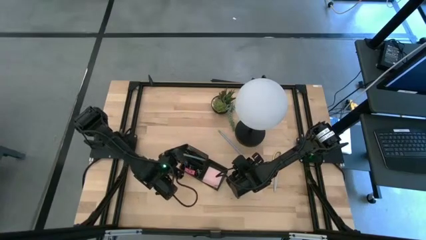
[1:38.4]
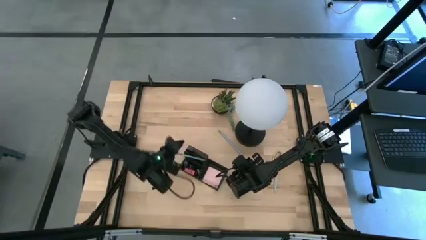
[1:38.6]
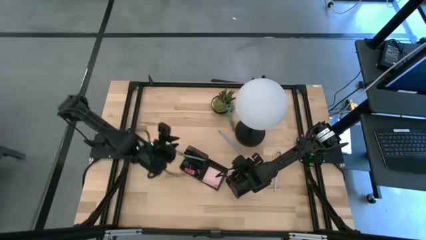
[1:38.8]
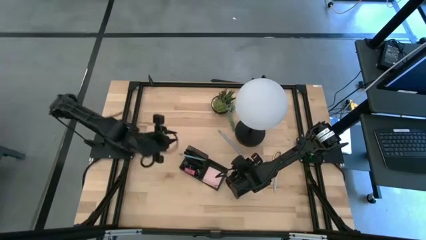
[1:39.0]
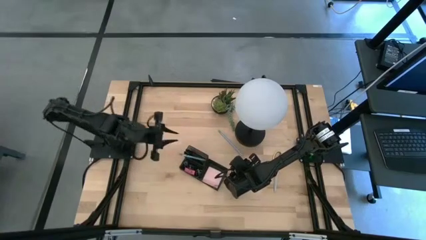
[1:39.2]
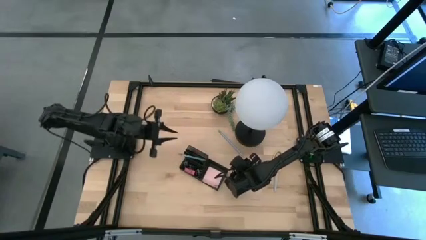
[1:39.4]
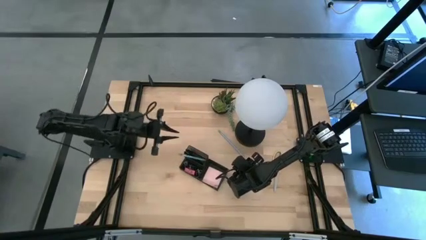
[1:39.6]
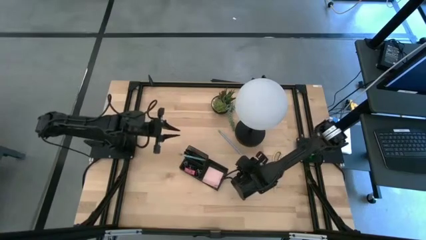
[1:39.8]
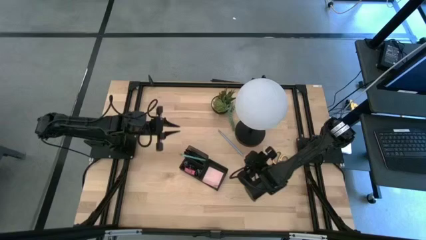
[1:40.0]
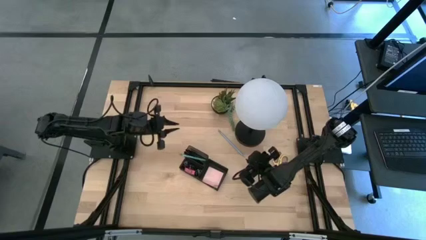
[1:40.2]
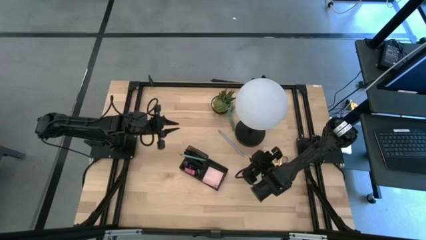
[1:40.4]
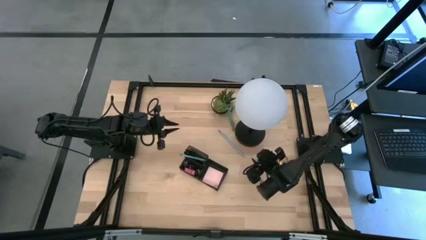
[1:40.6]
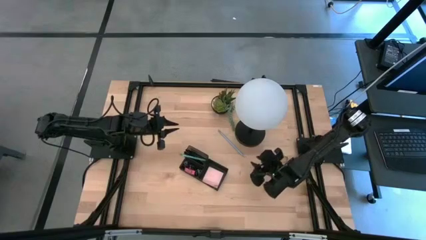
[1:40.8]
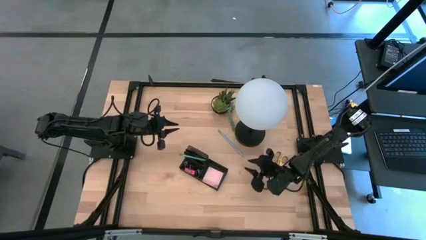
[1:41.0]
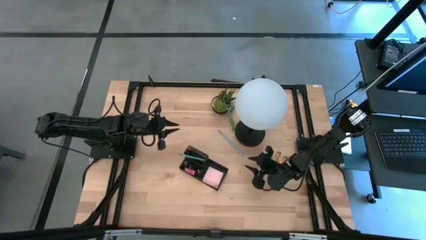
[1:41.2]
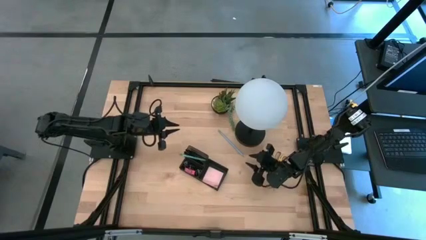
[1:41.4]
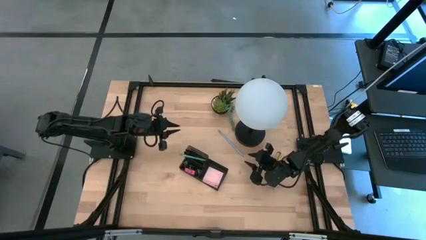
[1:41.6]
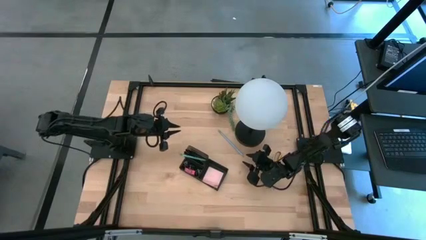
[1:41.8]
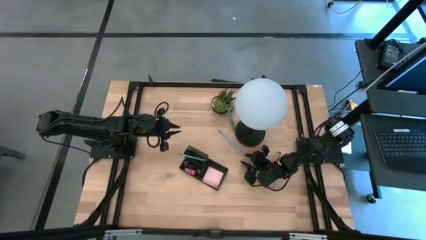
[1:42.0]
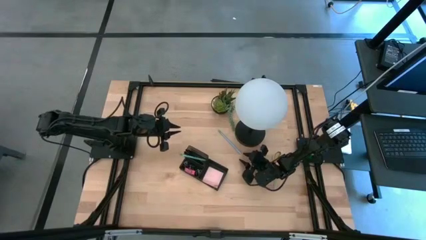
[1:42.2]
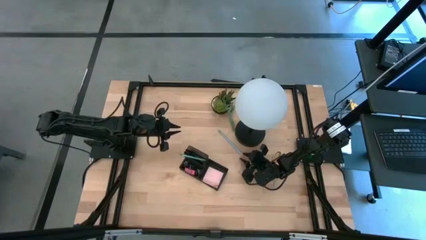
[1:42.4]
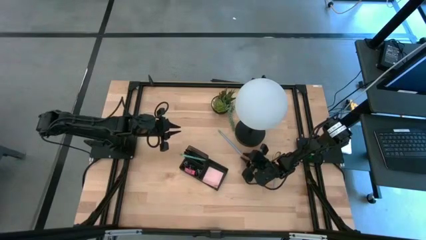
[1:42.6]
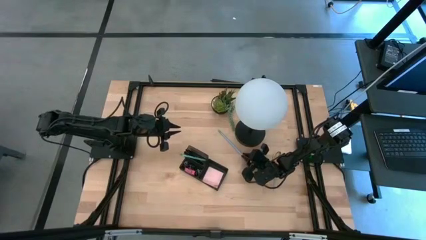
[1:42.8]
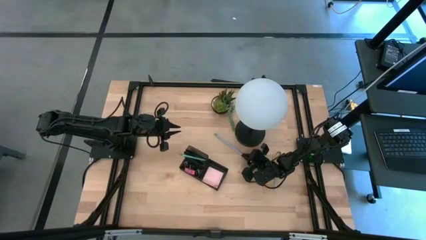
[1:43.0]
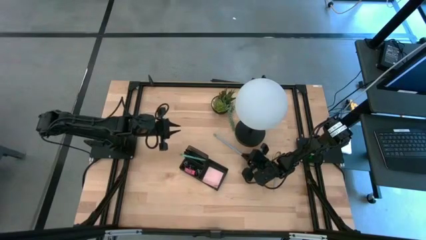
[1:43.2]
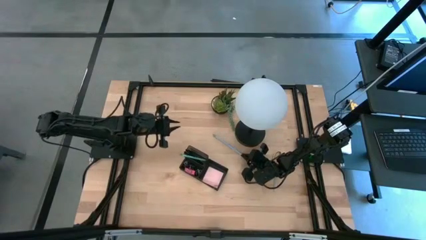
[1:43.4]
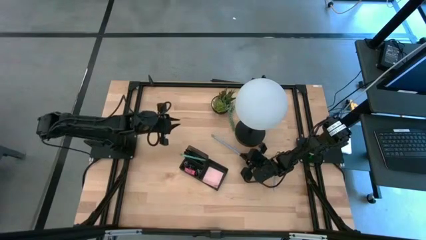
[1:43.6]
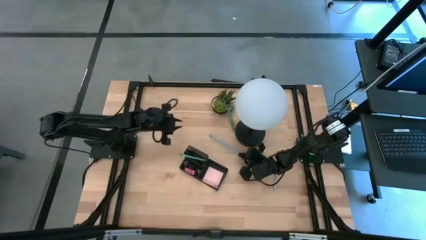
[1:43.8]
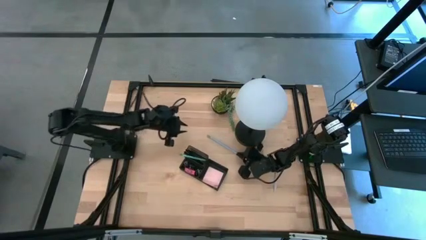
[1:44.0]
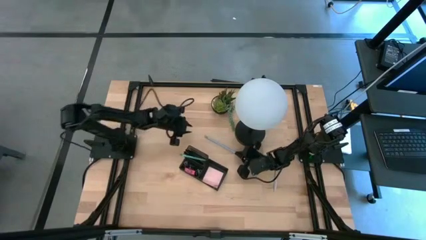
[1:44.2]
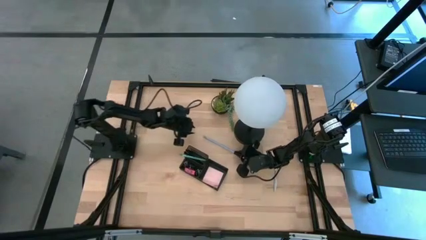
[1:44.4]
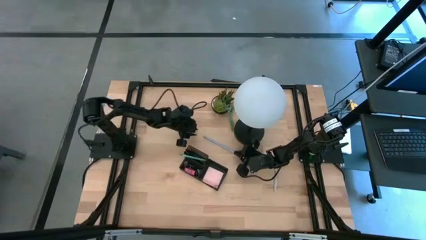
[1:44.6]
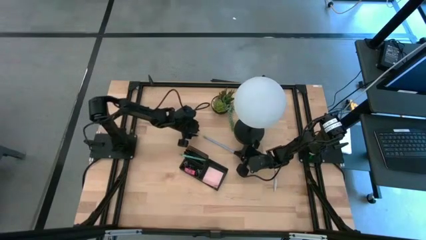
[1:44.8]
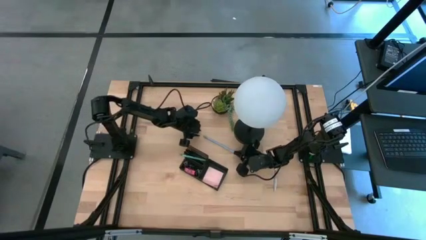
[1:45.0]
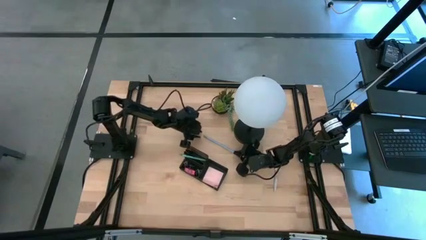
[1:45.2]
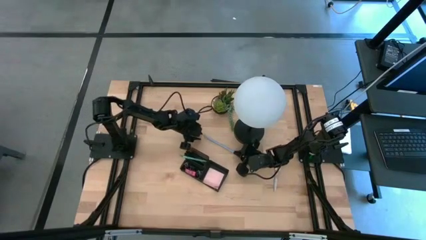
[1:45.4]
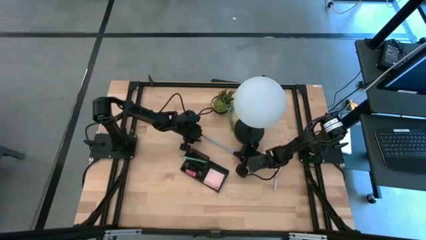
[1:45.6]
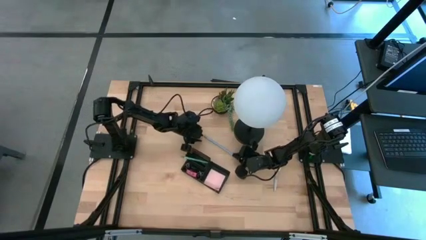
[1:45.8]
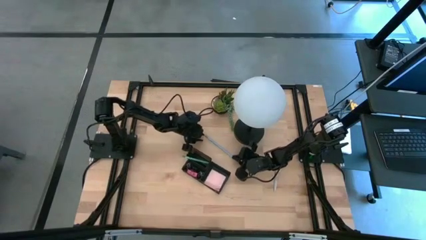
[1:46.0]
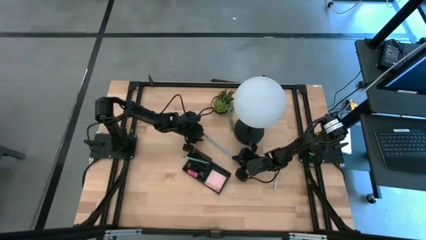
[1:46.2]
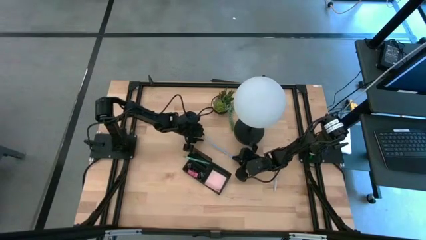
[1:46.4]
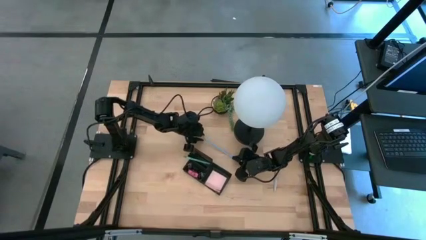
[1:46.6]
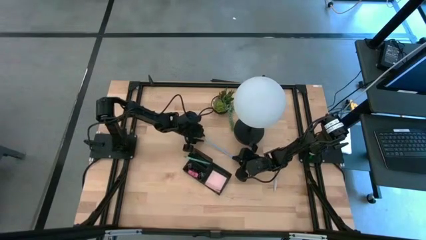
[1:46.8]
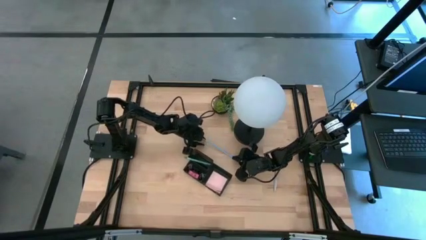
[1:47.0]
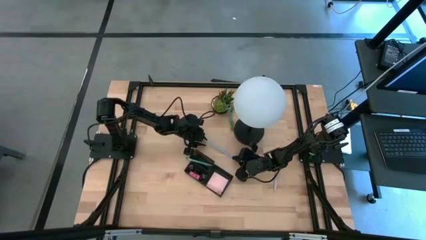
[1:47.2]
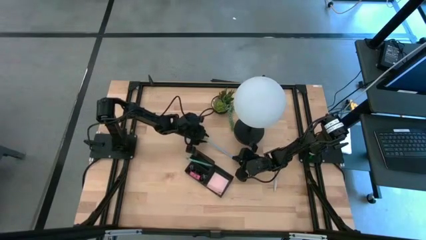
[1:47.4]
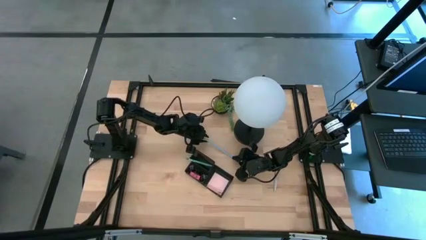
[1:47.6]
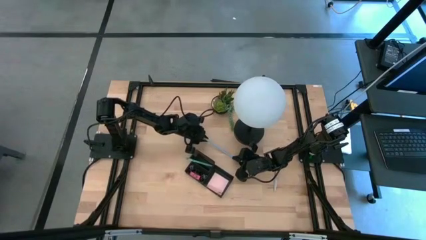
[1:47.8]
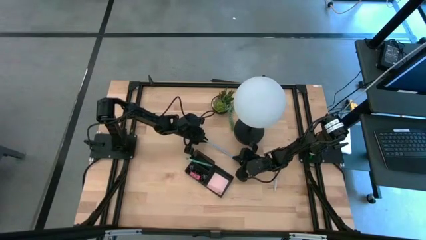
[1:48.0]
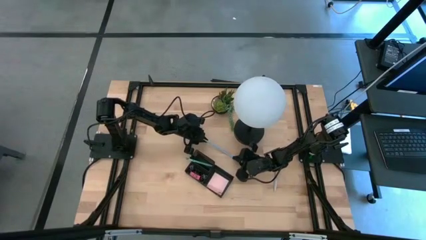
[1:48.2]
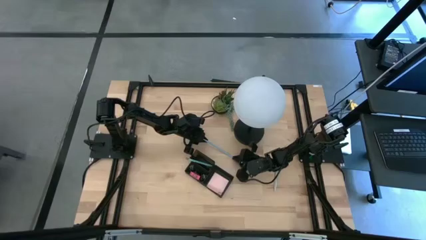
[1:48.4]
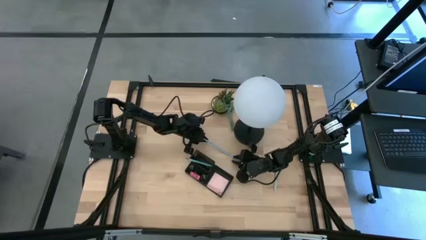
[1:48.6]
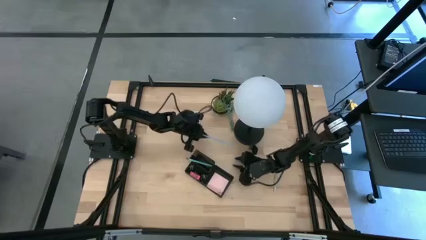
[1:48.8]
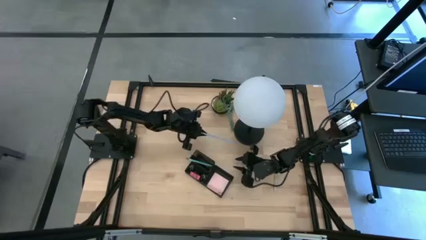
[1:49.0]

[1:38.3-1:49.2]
Task: Pick and place office supplies into organizer
Put the blue pencil into the desk organizer
